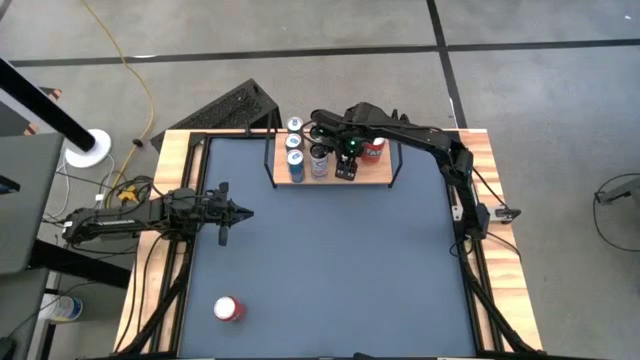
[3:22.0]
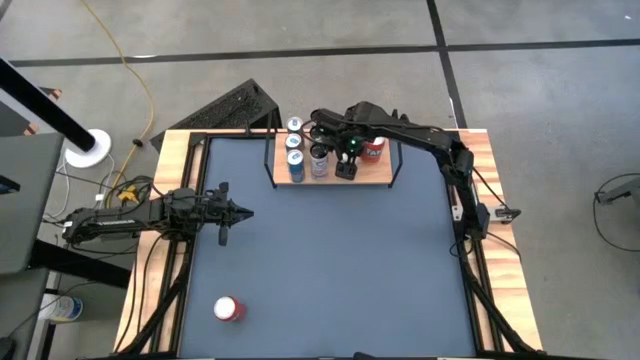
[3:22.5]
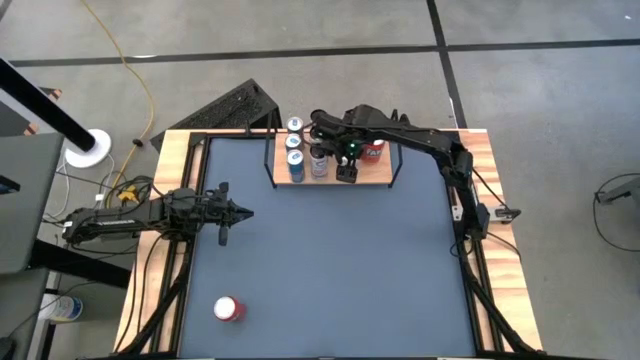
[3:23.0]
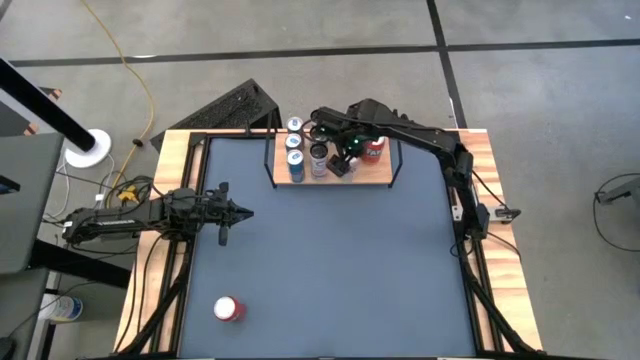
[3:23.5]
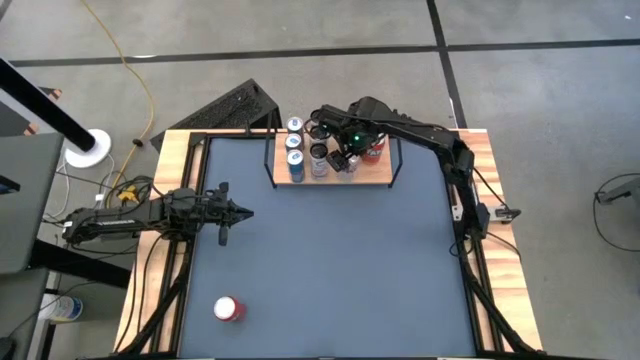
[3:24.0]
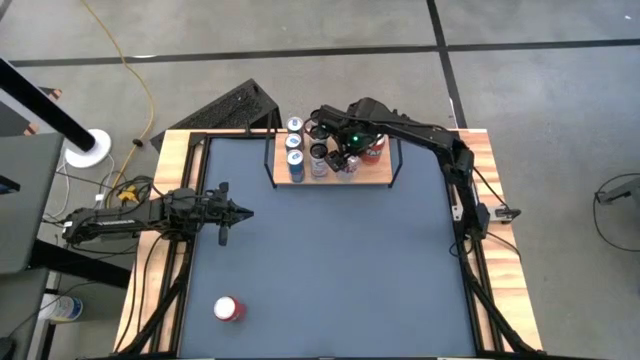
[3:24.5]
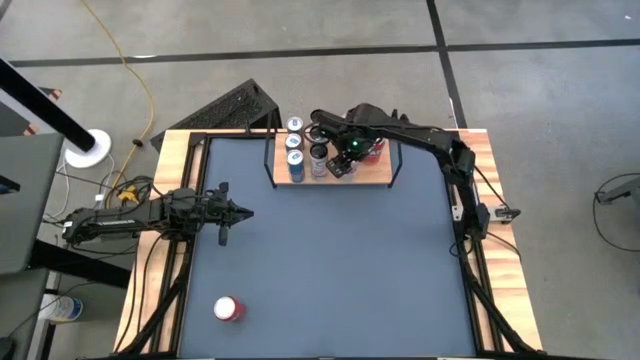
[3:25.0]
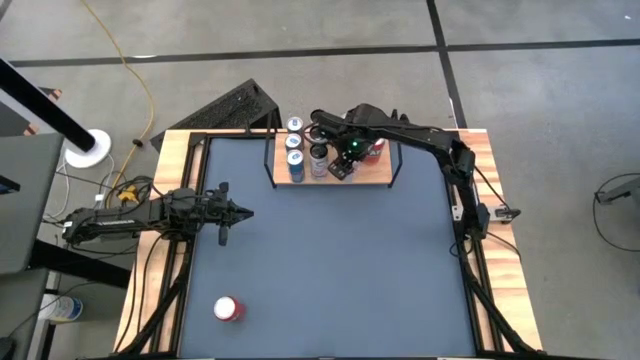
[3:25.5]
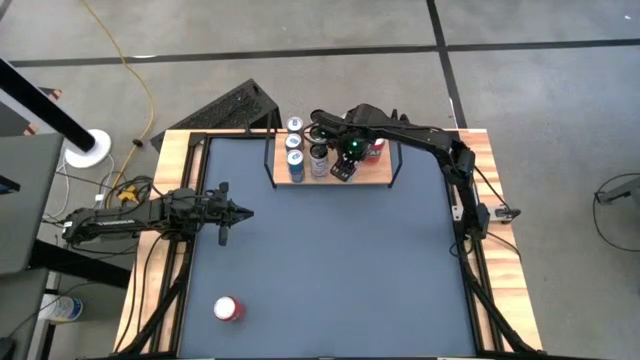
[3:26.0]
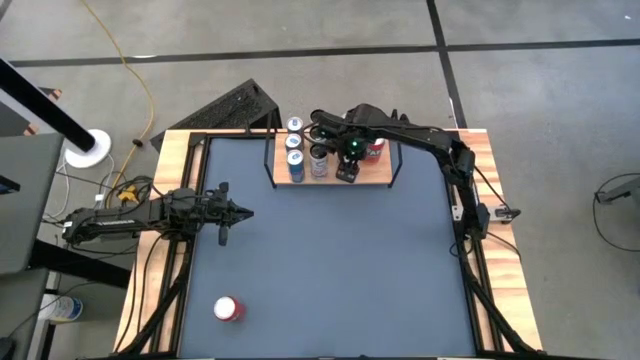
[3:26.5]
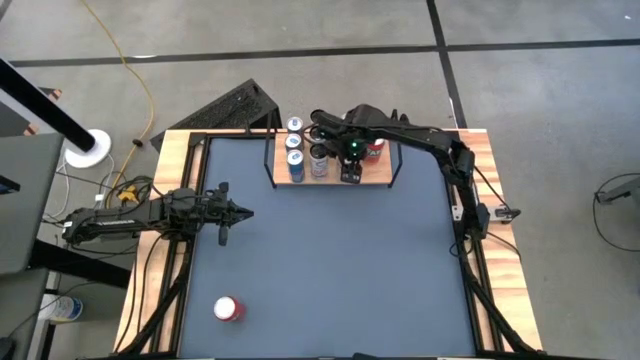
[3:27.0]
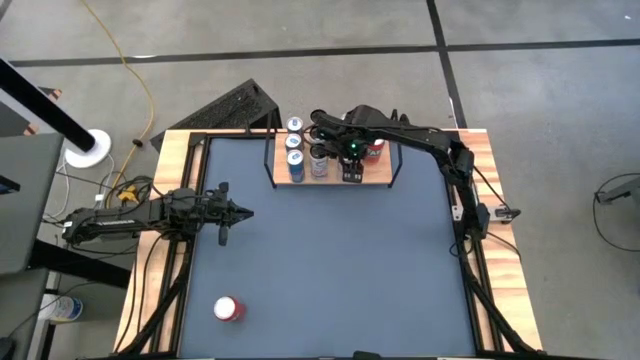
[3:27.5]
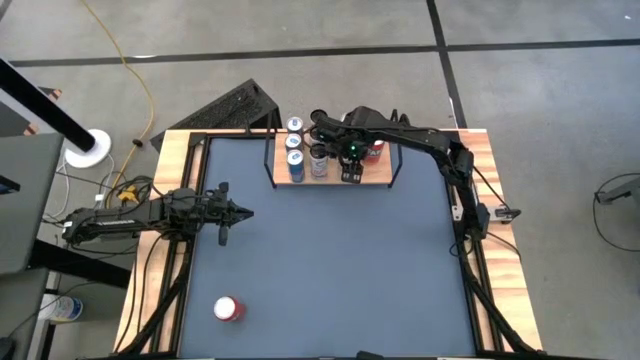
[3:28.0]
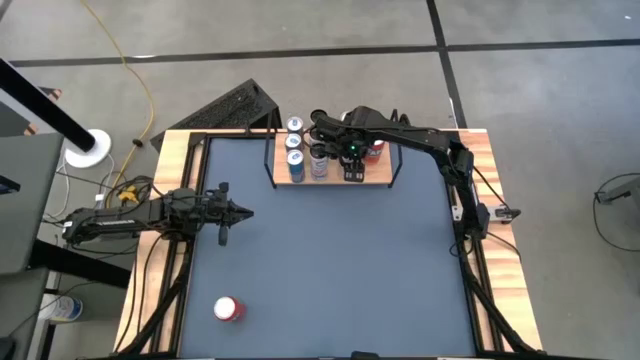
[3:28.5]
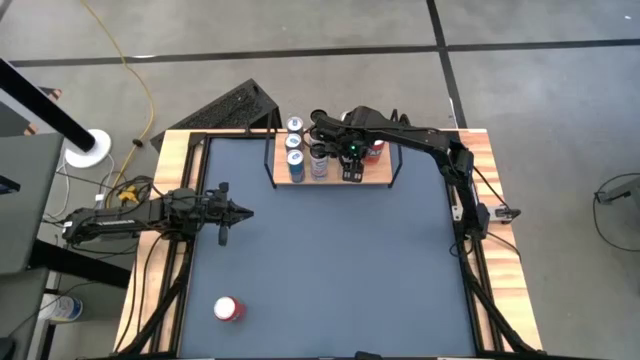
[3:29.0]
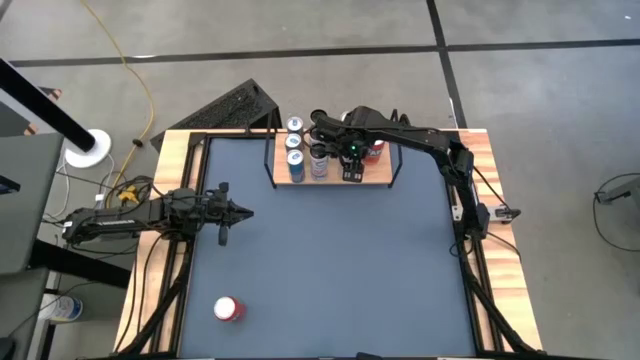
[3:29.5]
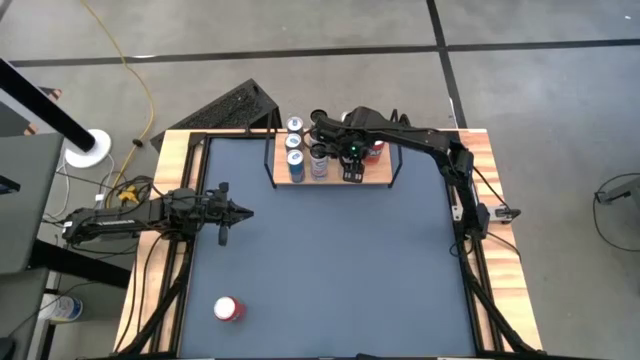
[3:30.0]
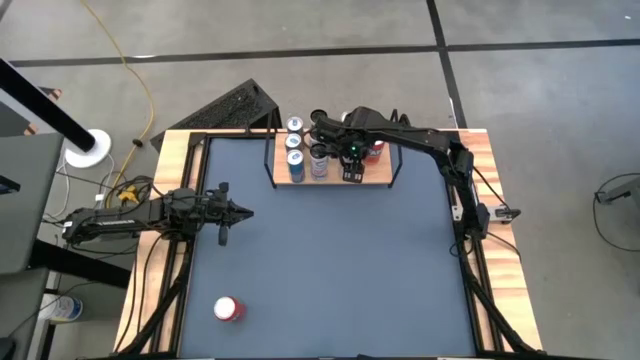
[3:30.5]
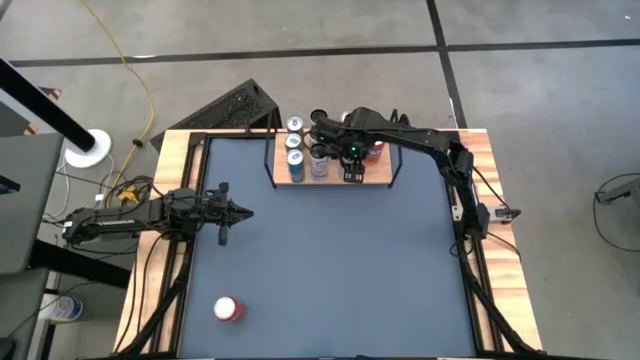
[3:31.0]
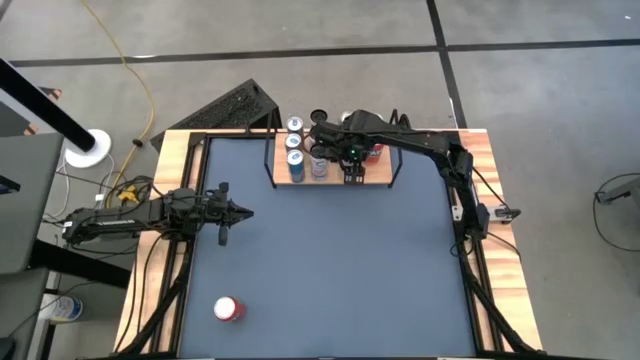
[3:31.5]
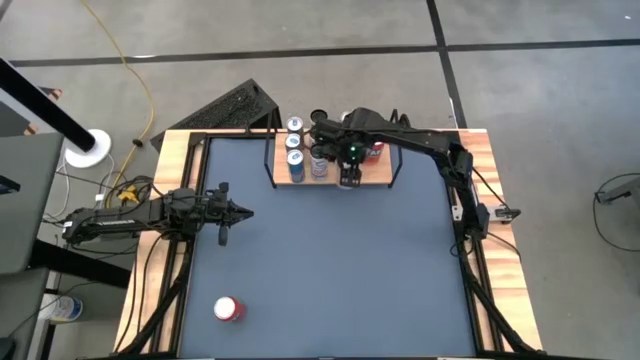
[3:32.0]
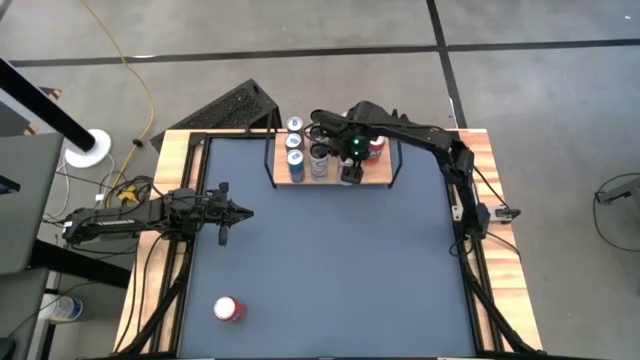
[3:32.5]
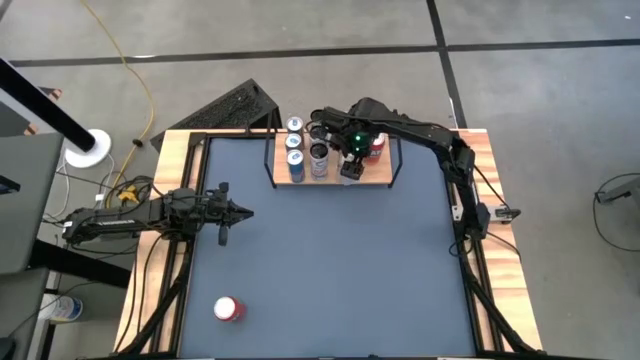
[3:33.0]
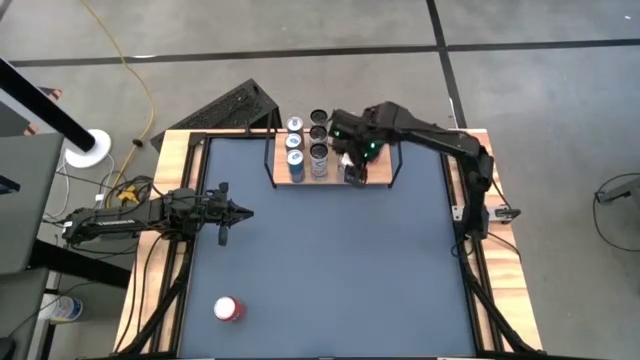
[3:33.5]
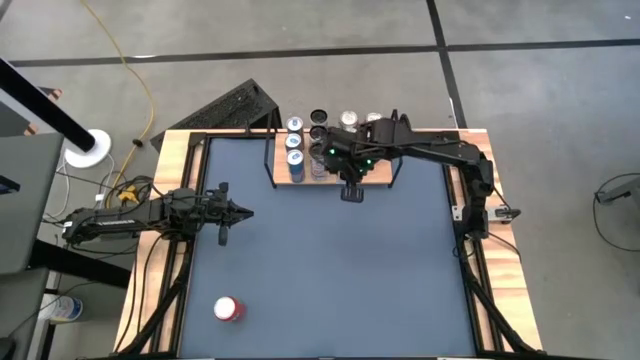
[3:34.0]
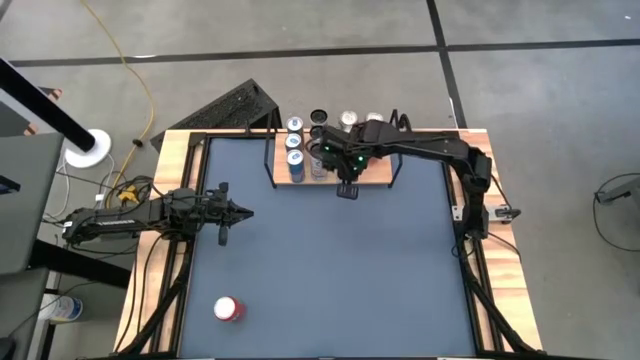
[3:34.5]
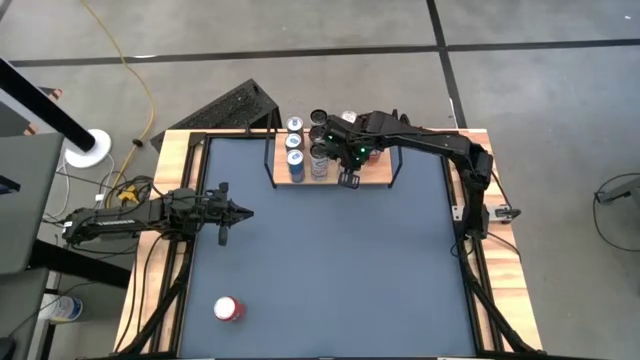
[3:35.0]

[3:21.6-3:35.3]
Task: Place canned beverage on shelf
Put the red-silver soda can on the shelf aligned with the other red-silver soda can

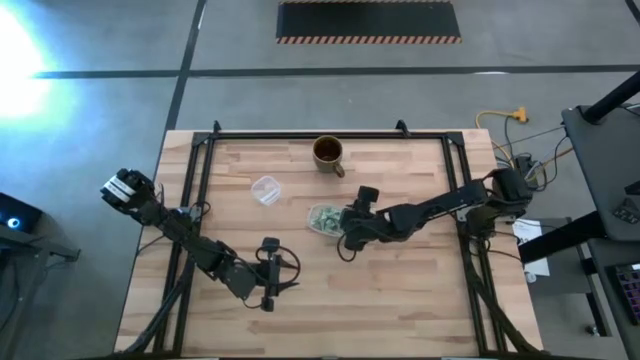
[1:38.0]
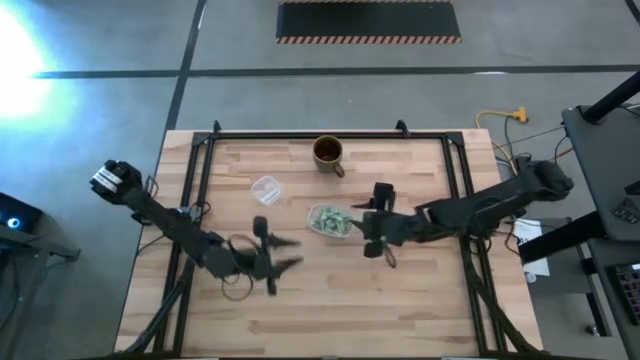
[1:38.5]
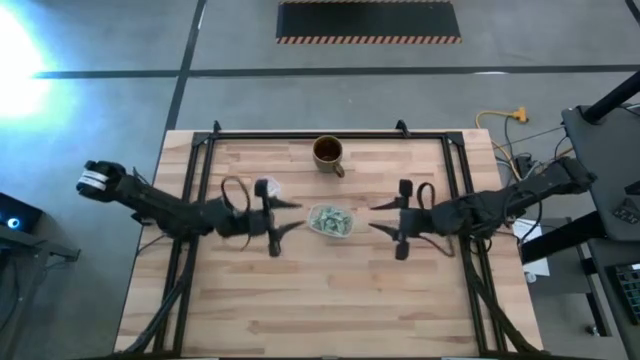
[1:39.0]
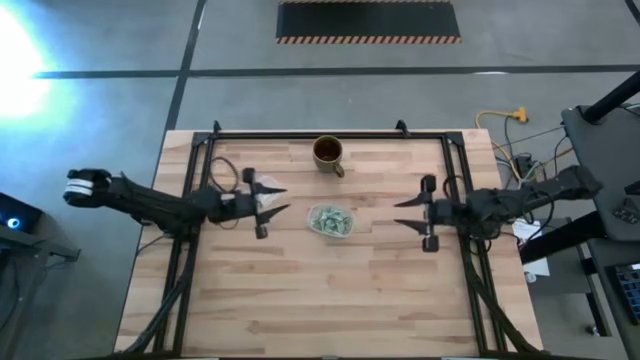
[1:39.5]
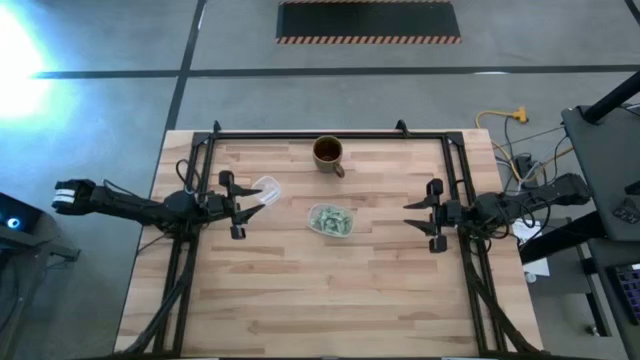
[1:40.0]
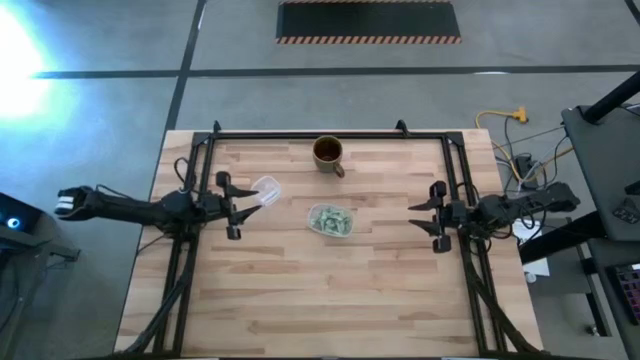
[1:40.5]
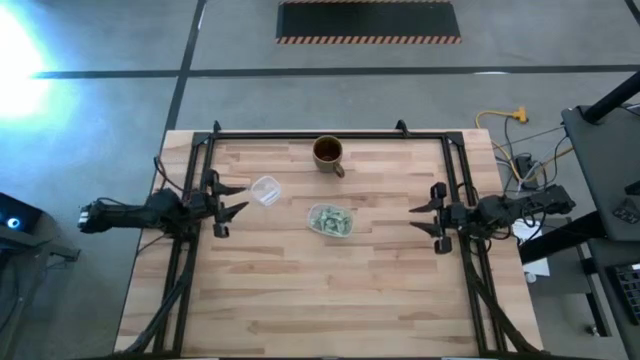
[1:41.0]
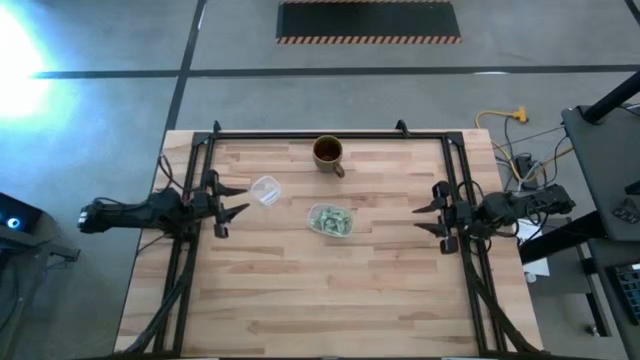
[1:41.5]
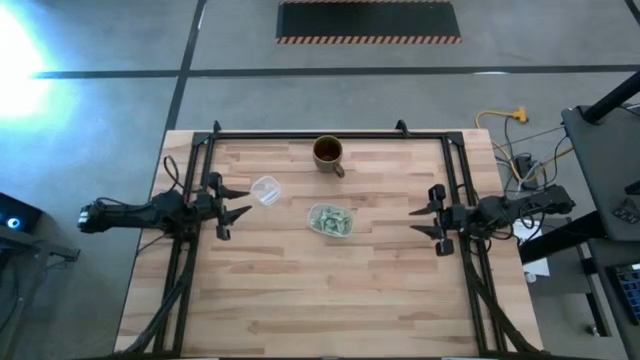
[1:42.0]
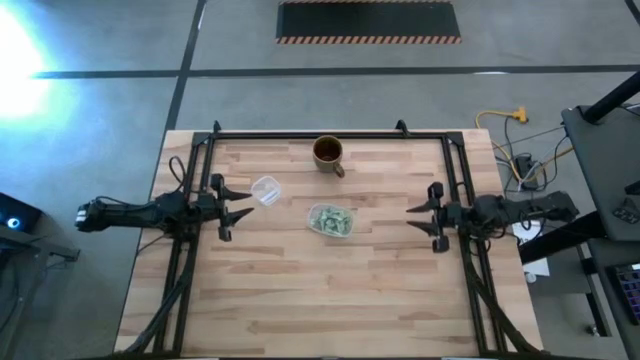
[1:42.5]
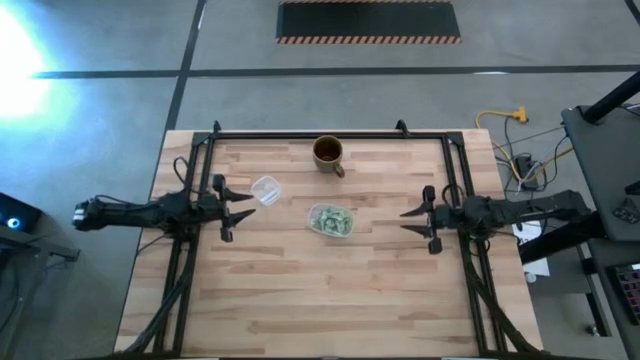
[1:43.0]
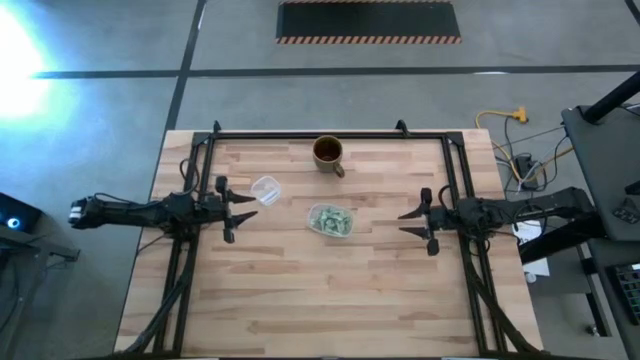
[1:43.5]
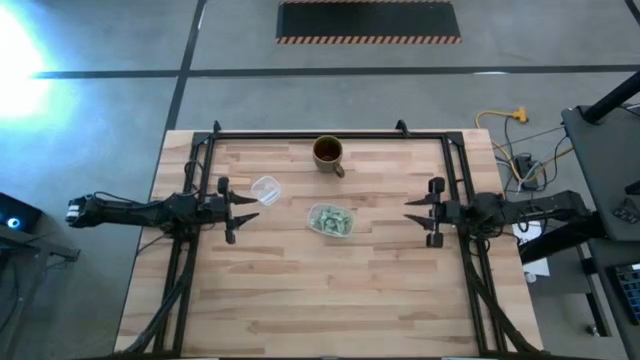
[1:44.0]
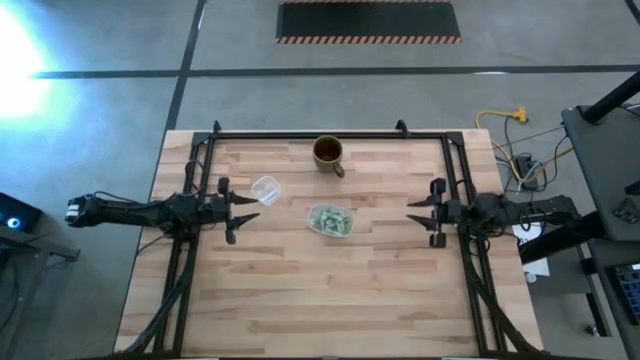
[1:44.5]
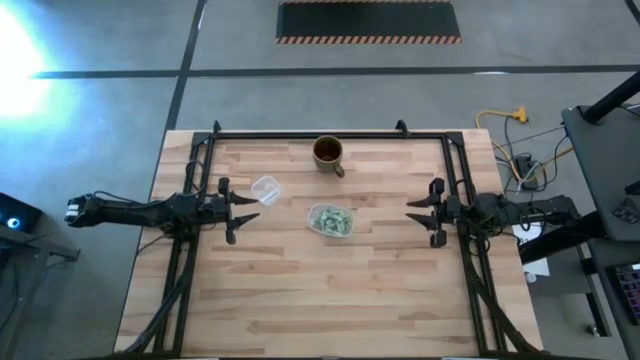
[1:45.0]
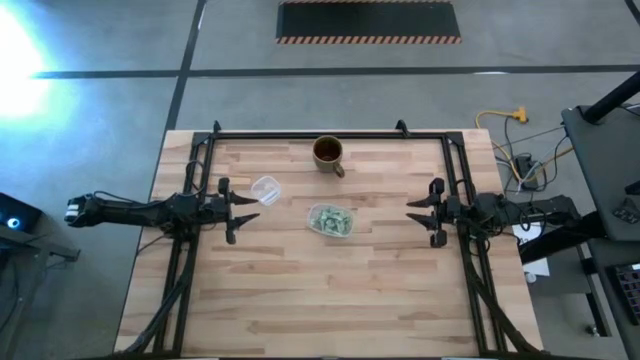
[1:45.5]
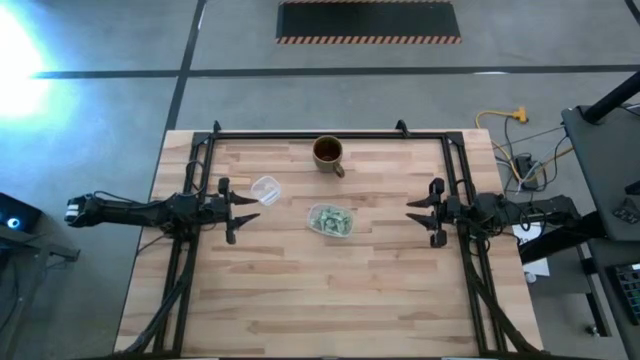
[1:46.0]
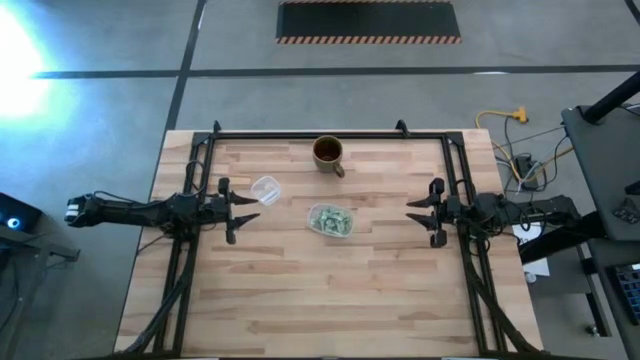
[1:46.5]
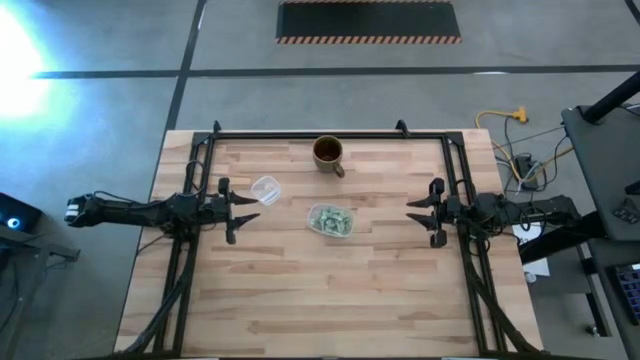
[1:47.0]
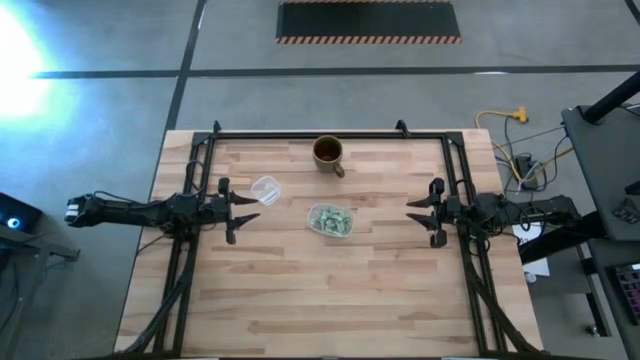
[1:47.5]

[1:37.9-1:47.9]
Task: Pick and place Stevia / Truvia into bins
Return to Home Position
